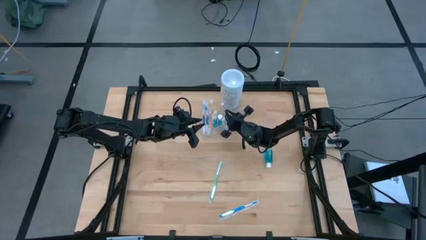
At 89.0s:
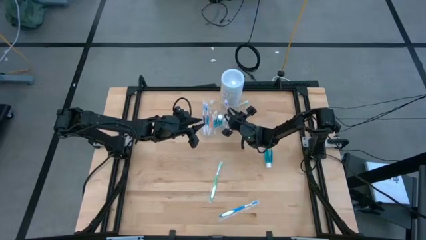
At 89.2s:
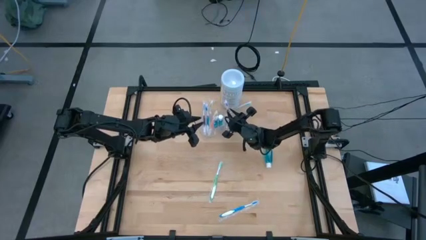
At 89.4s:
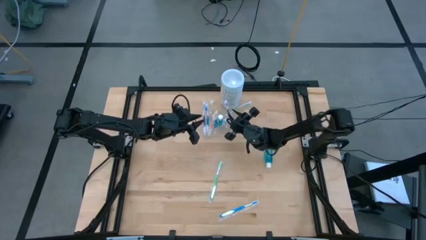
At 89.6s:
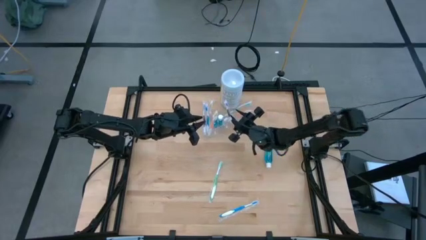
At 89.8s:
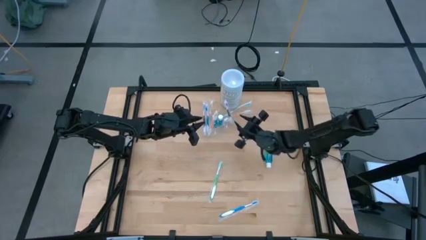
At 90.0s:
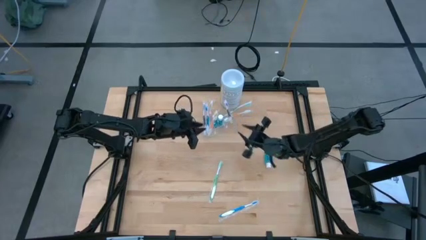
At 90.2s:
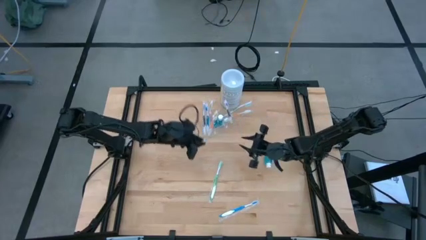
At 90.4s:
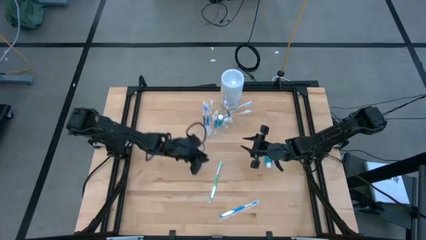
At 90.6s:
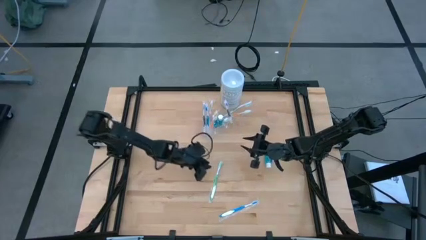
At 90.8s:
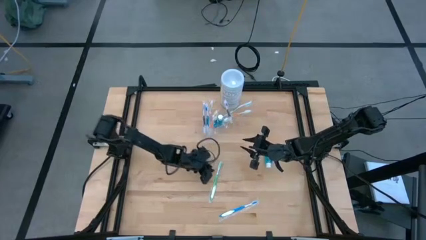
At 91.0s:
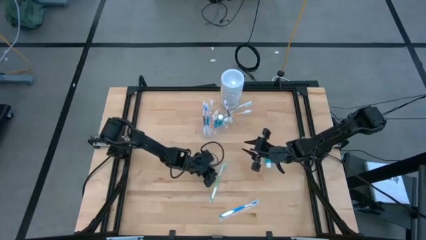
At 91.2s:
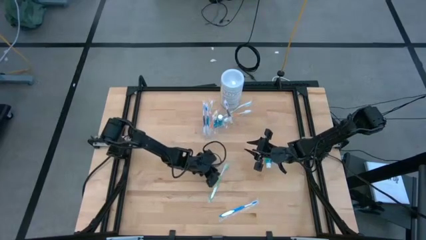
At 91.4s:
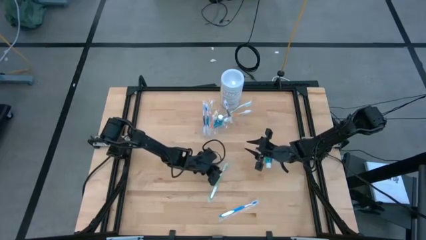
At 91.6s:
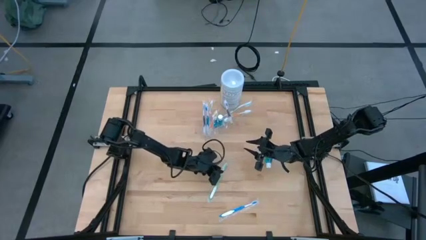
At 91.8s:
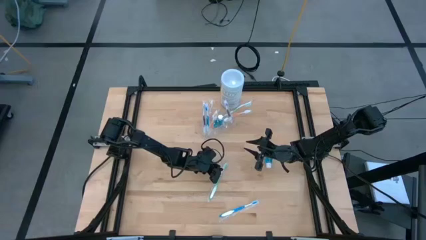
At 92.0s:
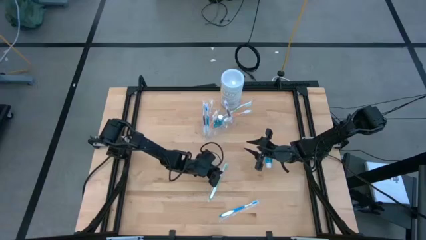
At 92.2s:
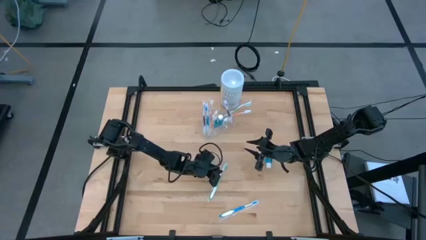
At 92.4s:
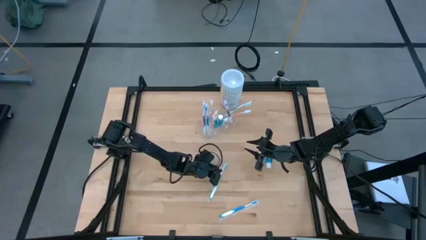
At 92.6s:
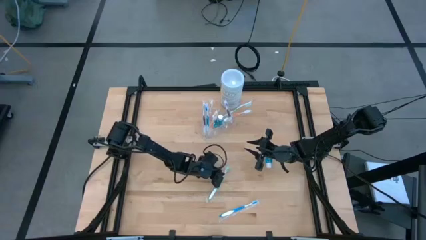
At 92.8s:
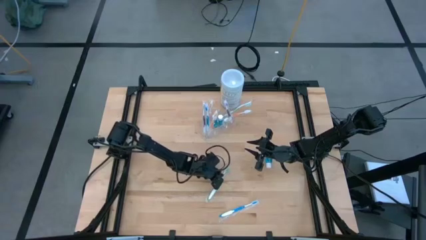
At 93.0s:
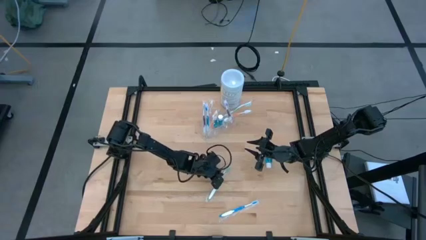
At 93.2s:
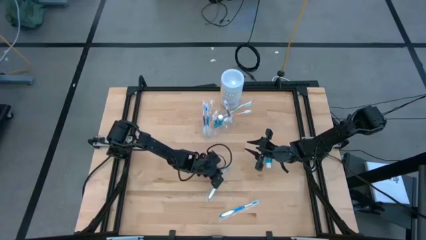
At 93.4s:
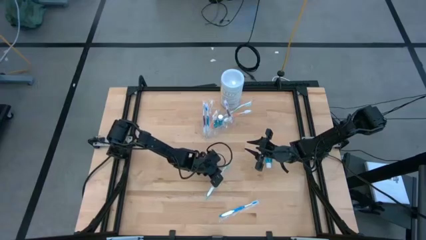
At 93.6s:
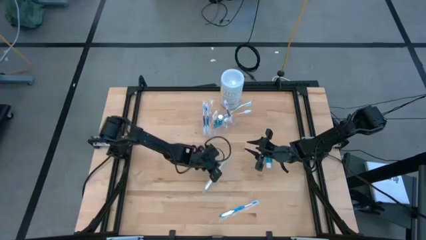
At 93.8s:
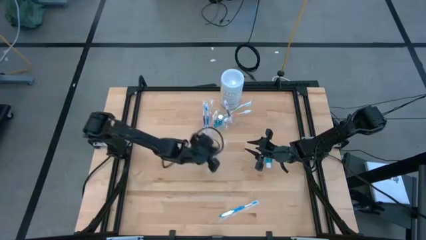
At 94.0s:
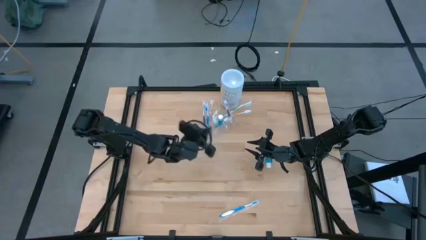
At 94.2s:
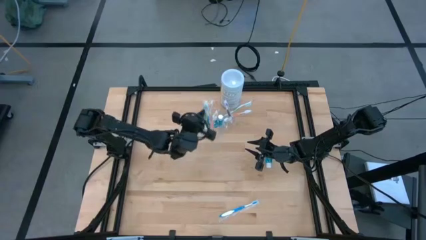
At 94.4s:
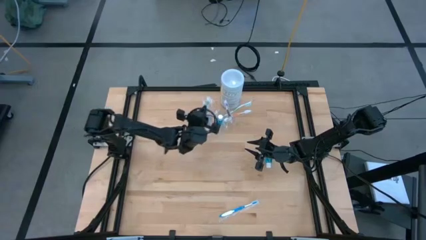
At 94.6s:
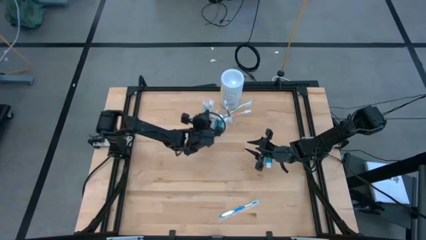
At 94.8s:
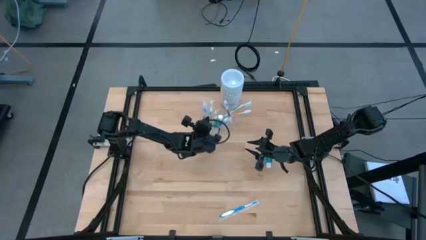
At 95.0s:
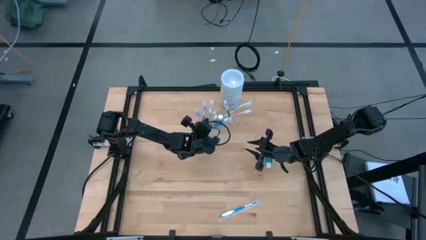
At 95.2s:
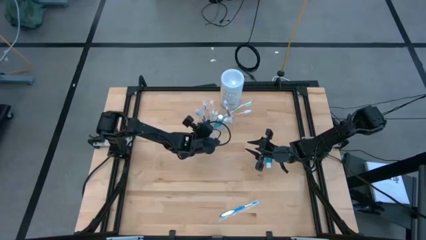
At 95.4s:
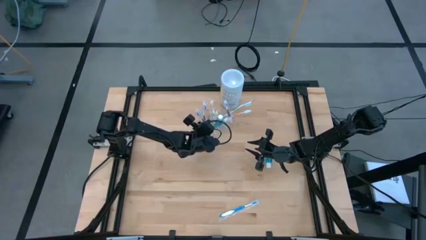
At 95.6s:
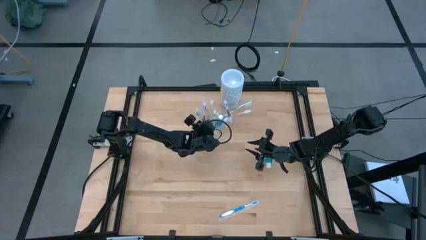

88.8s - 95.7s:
Task: Pick & Place toothbrushing station
Put the green toothbrush into the transparent organizer

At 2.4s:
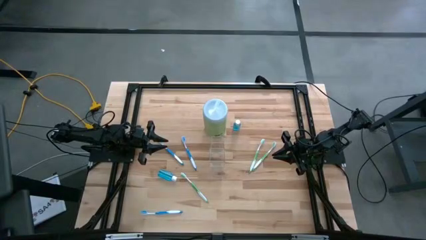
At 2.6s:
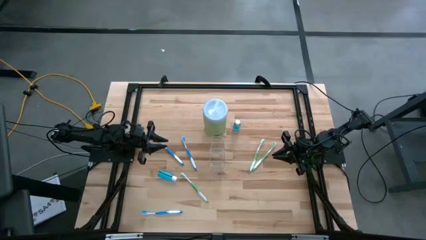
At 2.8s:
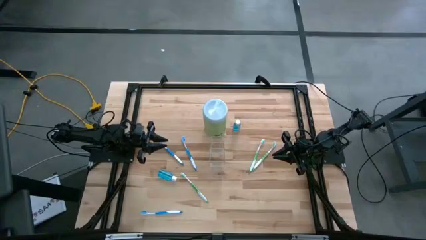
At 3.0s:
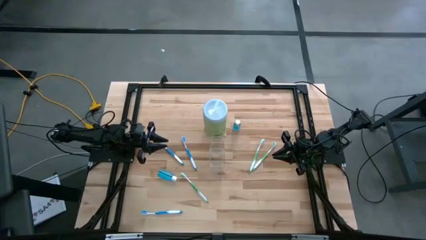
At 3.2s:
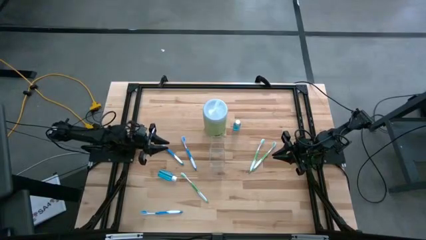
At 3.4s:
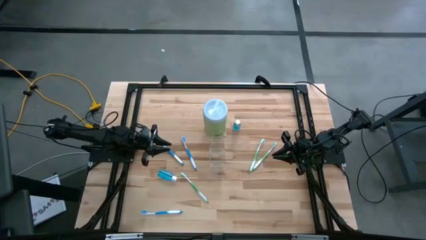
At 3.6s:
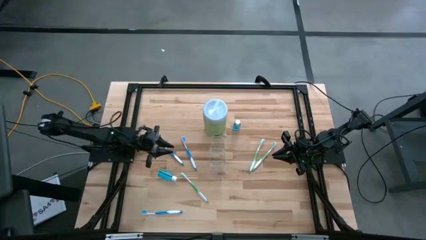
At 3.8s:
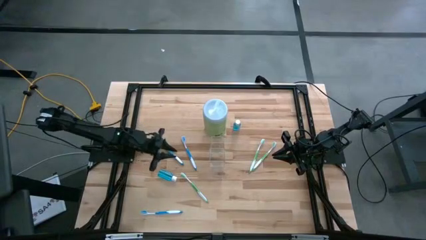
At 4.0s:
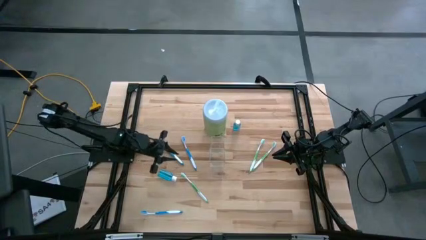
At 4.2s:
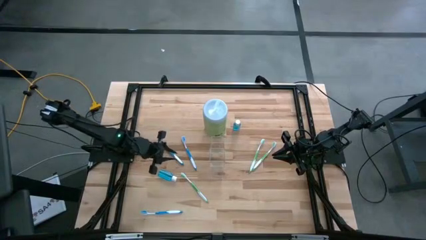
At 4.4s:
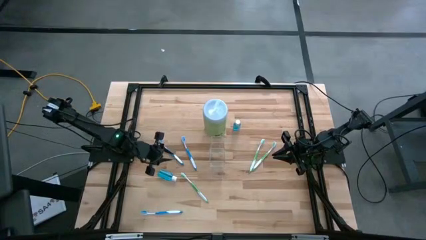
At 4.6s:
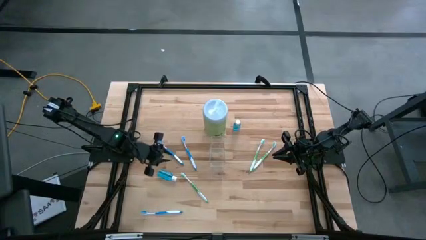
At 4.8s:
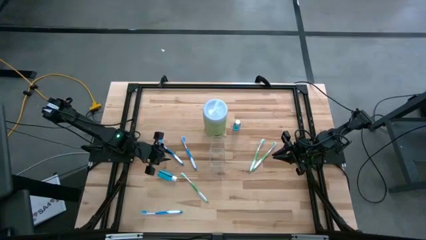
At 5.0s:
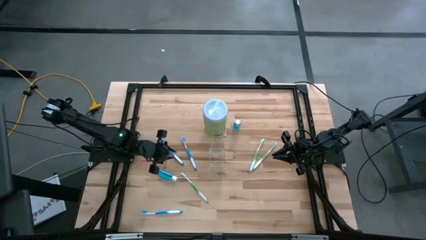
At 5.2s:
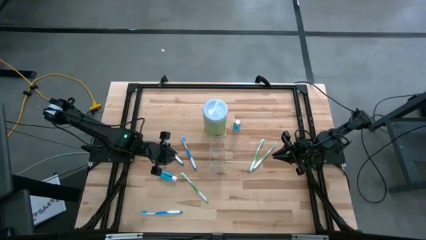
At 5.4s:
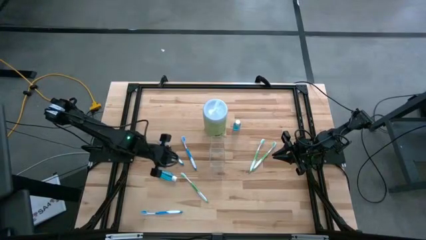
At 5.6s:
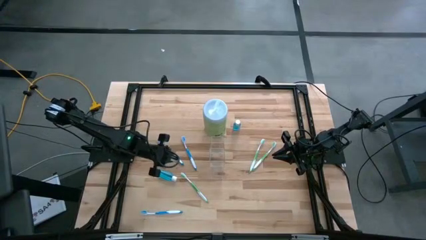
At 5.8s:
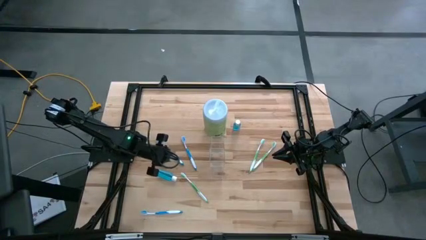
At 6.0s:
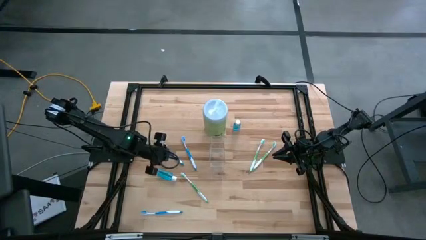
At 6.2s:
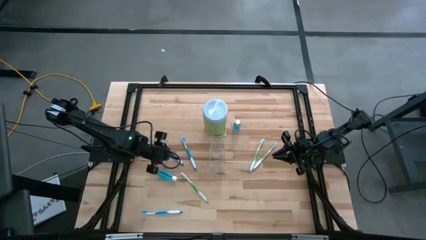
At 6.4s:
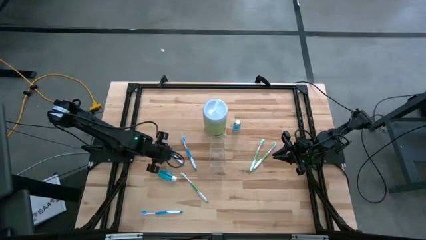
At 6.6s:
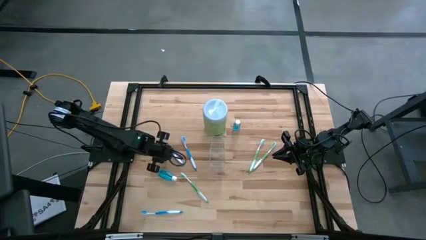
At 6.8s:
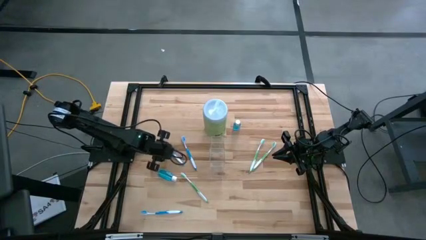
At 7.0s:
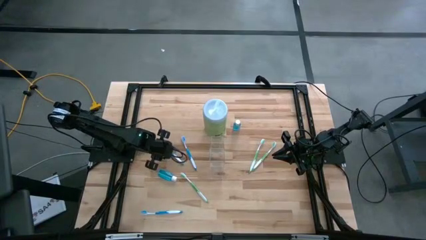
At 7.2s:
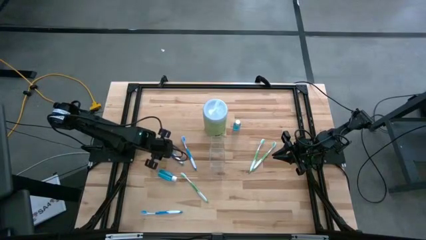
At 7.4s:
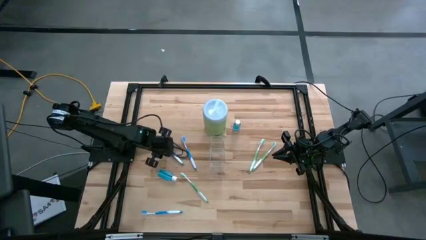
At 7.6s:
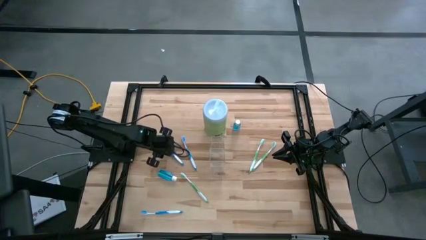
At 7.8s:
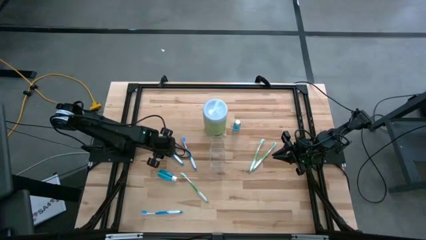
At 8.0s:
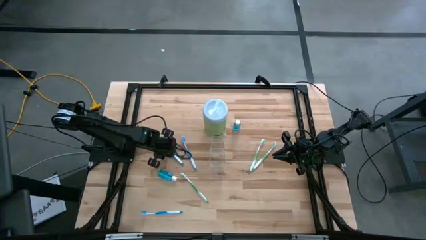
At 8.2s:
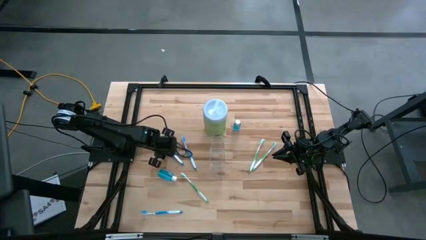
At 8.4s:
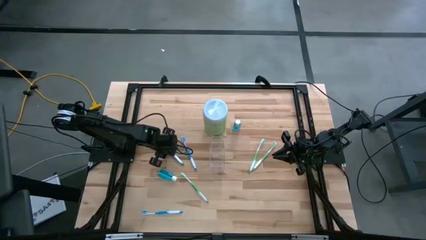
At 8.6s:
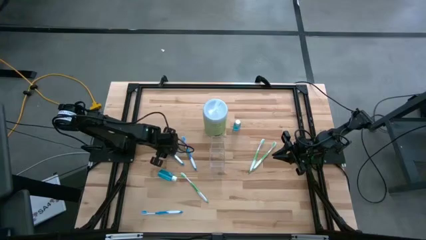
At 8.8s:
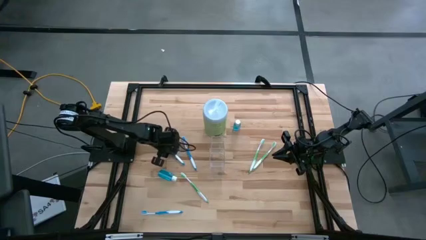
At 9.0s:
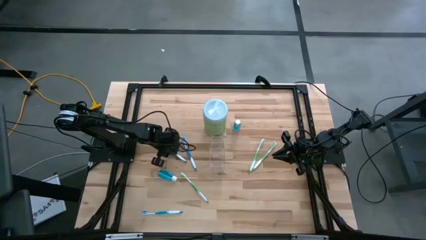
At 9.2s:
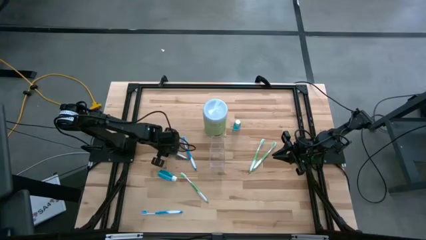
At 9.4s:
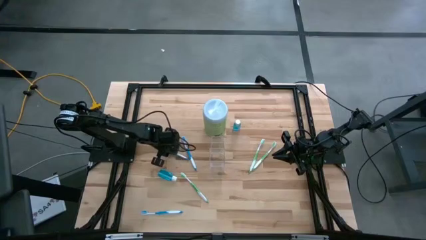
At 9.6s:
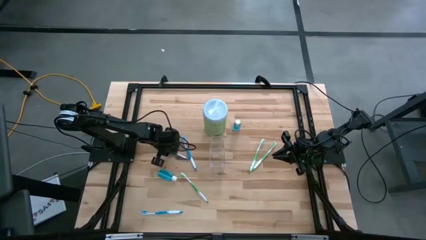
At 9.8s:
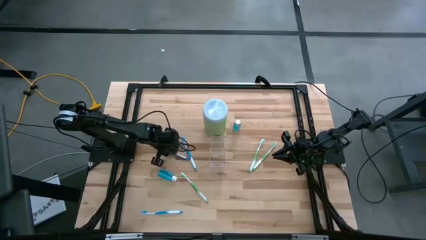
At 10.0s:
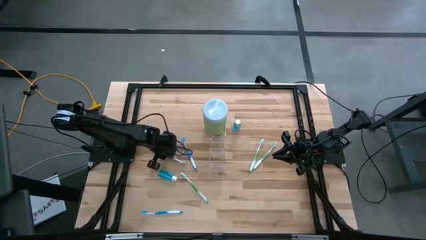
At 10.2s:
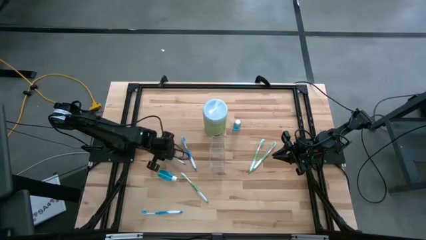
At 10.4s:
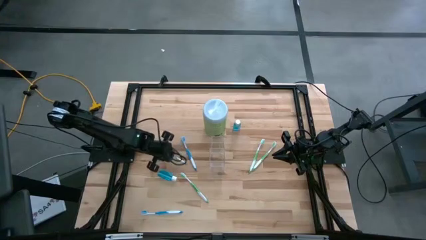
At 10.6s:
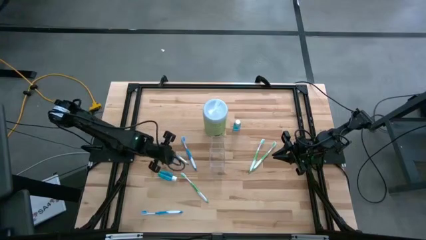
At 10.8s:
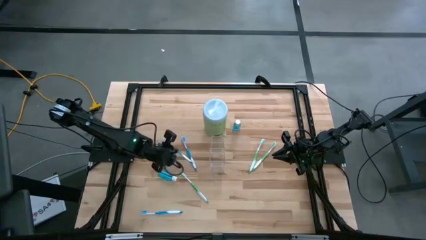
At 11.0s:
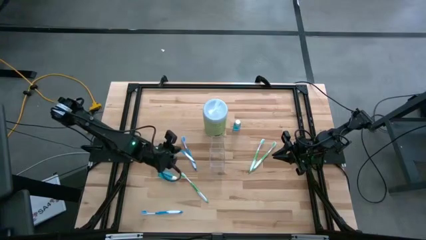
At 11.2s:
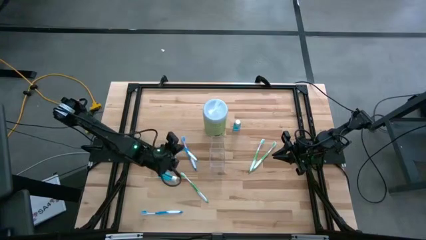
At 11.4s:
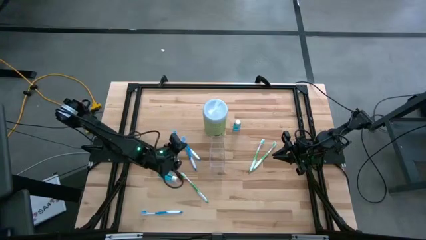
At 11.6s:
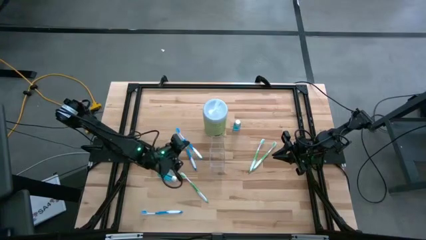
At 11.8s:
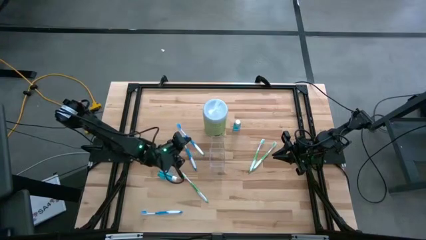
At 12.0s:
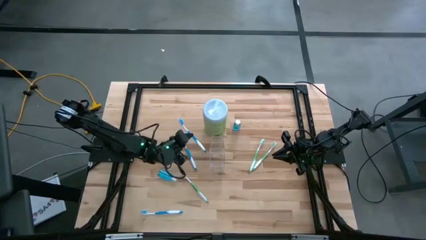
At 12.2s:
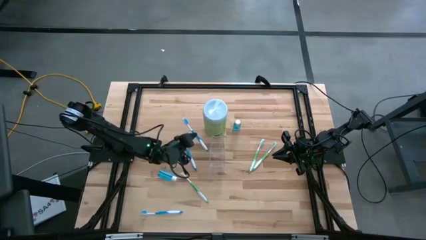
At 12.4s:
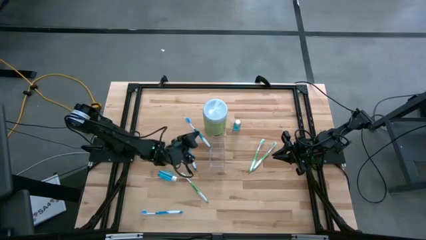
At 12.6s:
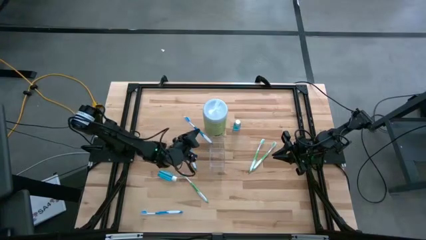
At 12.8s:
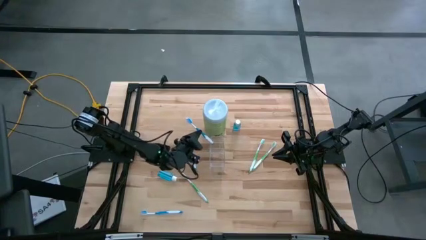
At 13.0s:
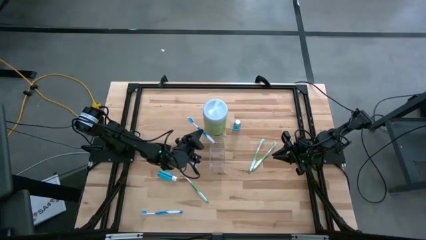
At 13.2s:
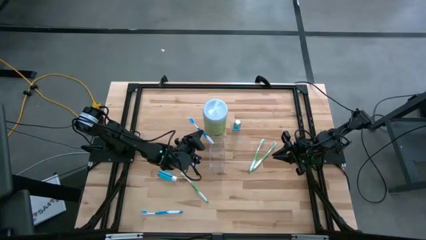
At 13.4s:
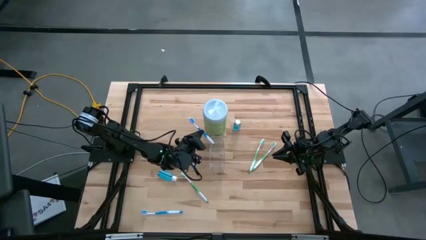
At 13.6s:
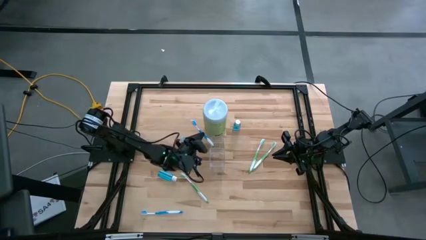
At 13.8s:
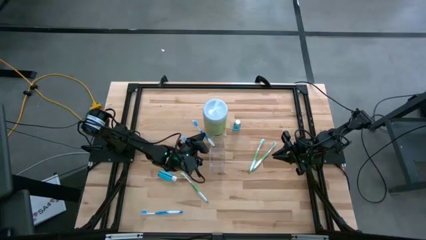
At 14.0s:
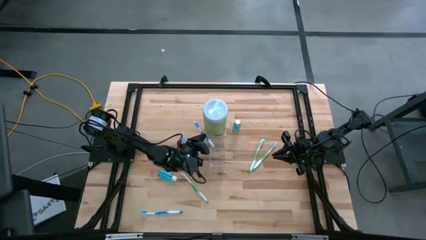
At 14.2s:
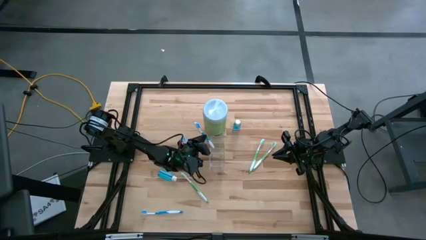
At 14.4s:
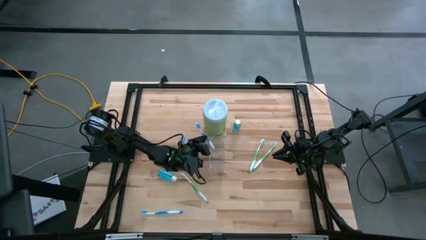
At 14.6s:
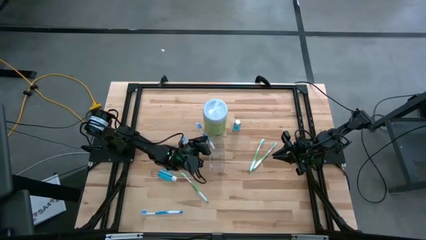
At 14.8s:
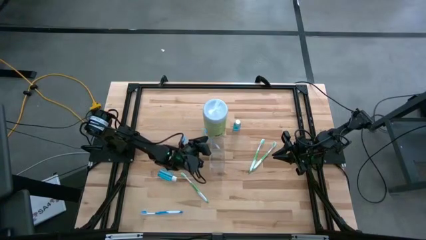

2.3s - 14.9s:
Task: Pick & Place toothbrushing station
Put the top left blue toothbrush into the transparent organizer
